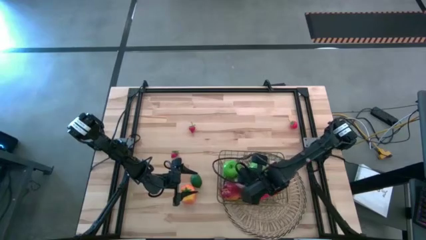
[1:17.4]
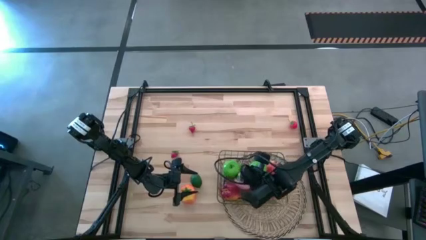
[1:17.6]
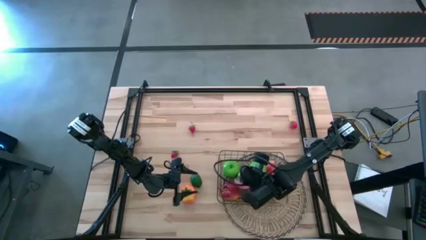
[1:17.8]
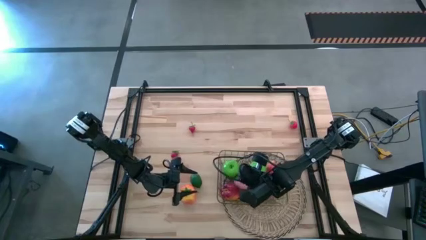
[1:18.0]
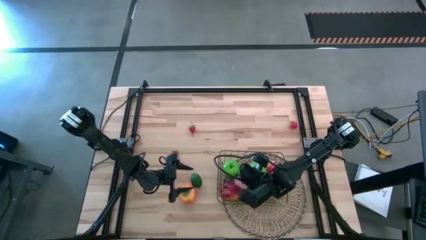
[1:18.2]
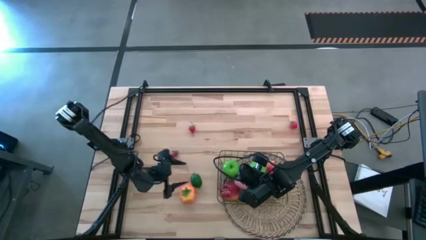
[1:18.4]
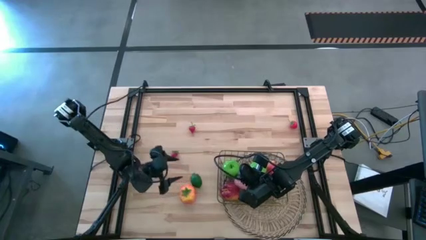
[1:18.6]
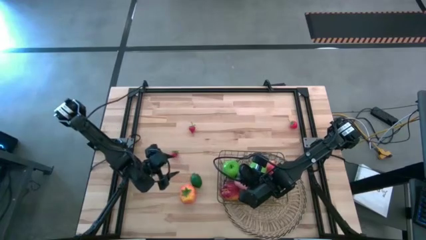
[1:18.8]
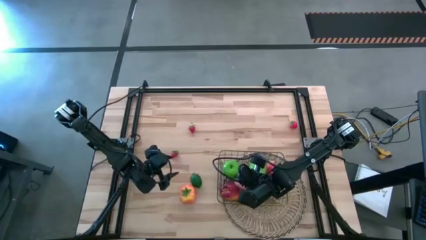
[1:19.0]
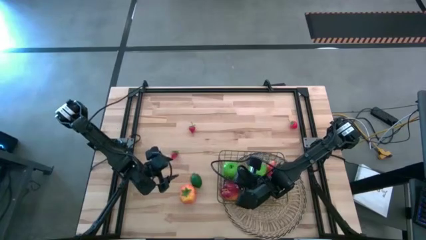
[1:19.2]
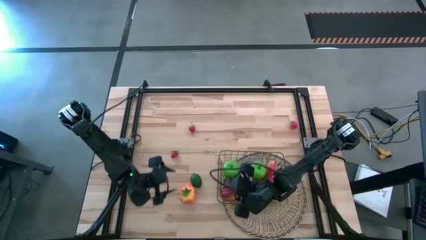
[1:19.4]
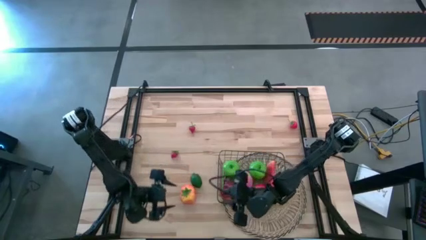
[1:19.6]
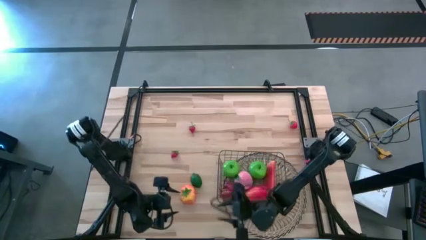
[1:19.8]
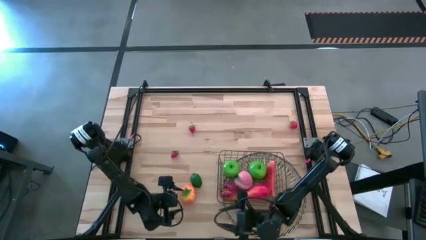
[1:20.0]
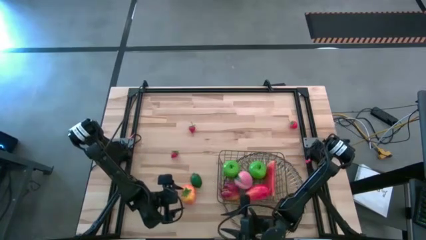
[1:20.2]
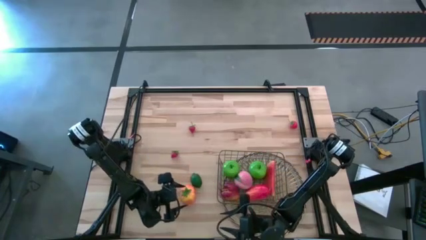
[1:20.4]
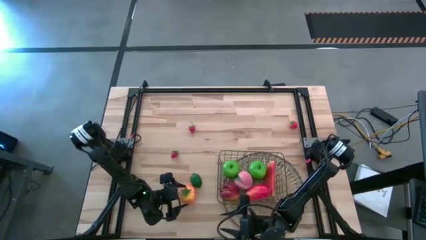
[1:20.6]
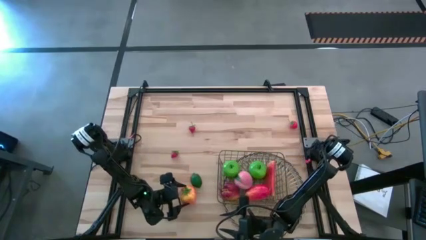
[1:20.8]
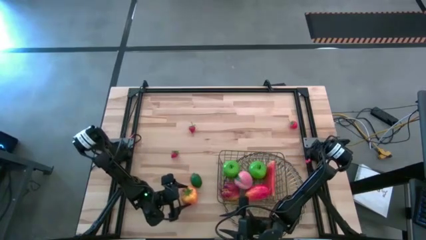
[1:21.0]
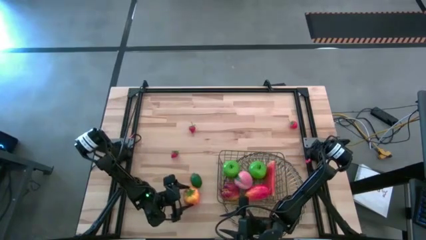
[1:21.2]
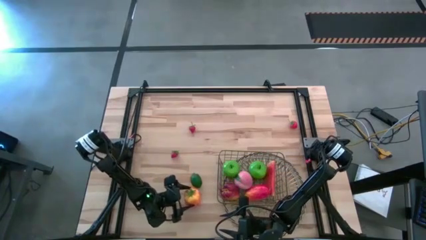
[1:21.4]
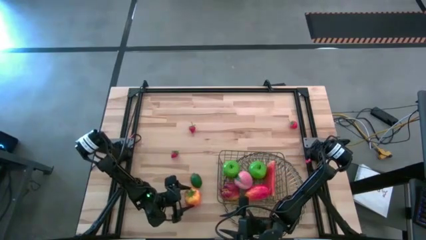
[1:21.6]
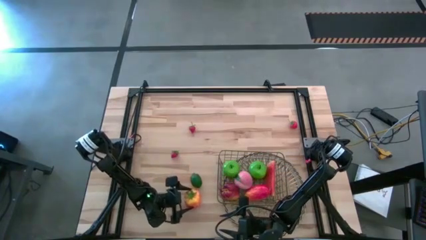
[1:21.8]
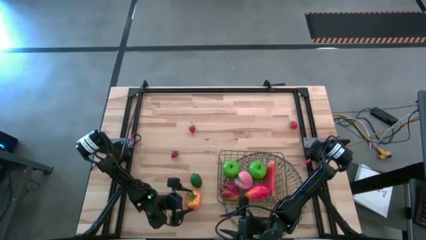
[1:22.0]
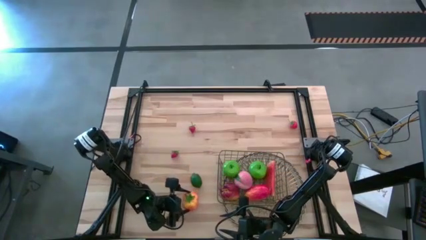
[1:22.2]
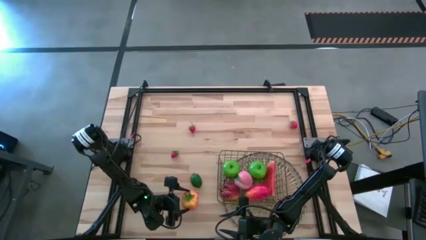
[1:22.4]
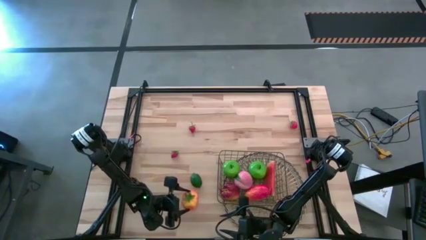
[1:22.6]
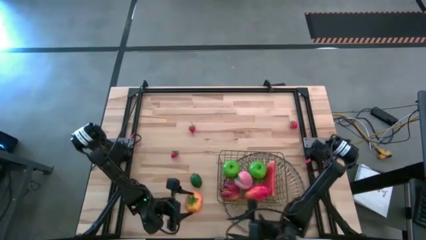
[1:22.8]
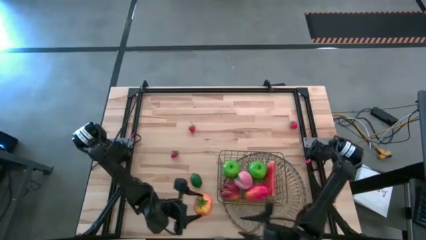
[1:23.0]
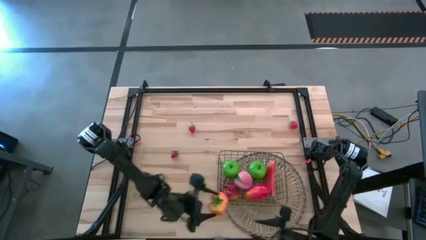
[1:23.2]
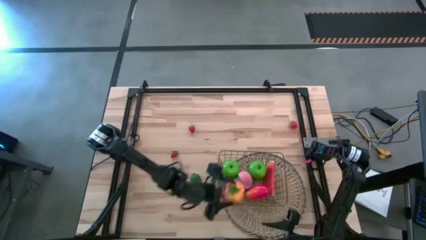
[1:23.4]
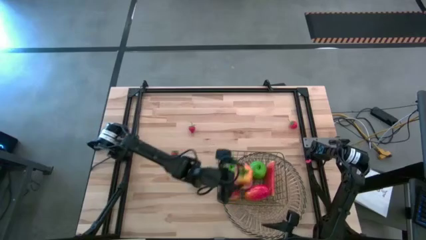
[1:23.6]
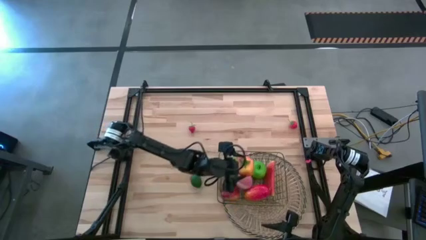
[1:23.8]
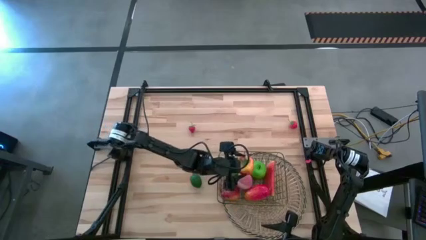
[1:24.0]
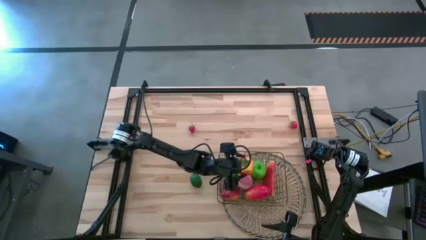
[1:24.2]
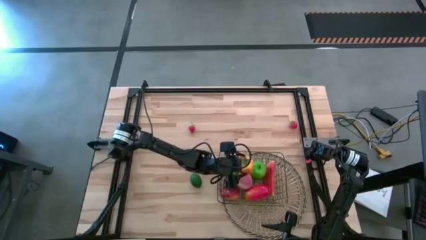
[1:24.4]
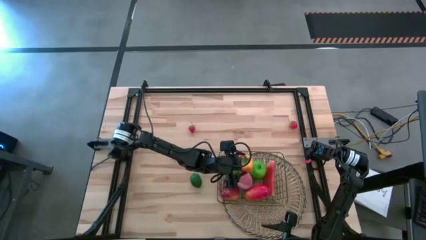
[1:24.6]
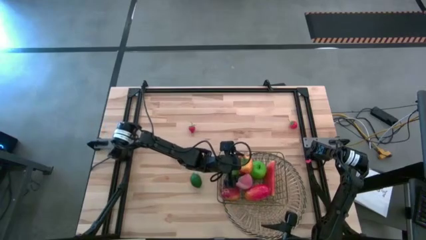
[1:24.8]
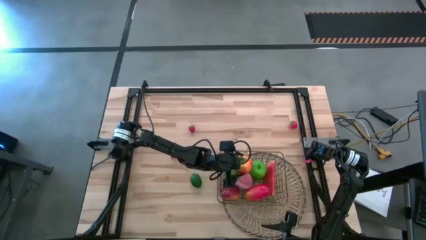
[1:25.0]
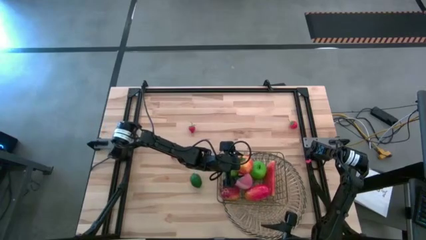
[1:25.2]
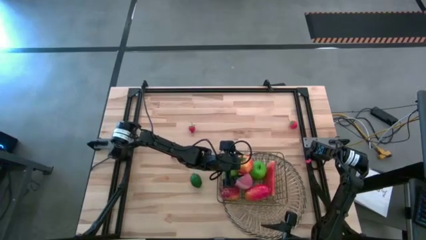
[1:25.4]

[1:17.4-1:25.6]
Task: Build produce basket
Put the tomato into the wire basket

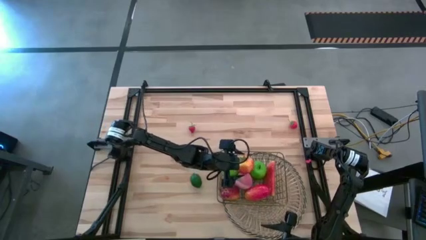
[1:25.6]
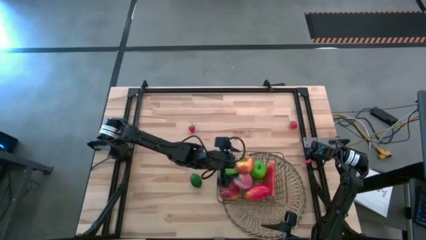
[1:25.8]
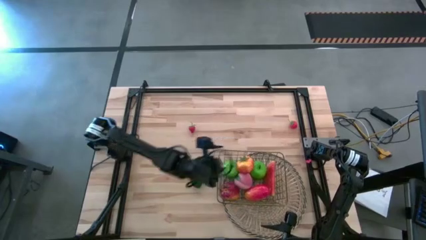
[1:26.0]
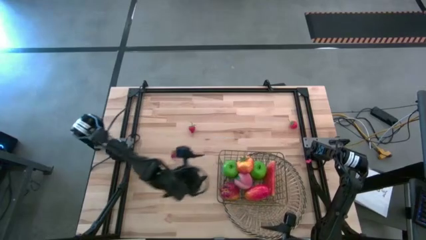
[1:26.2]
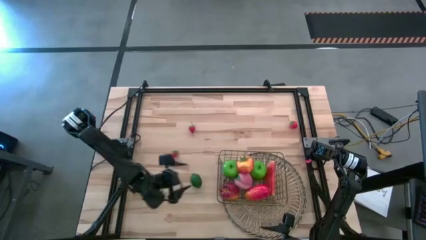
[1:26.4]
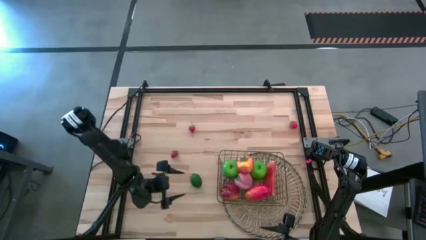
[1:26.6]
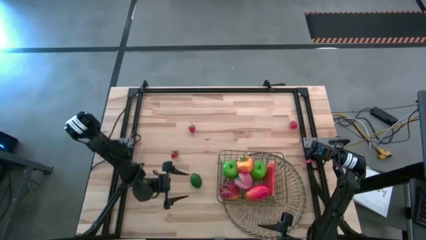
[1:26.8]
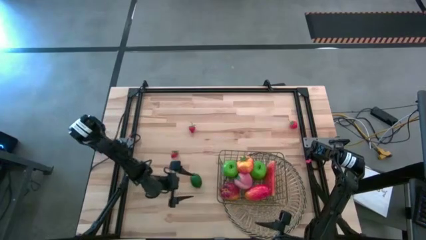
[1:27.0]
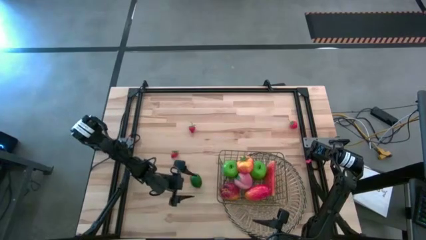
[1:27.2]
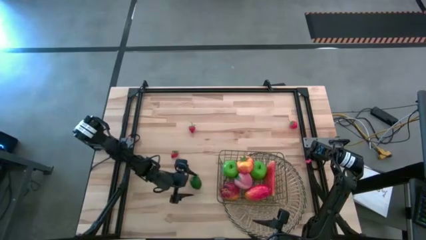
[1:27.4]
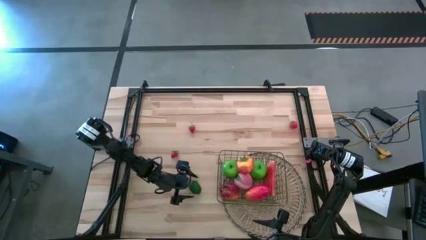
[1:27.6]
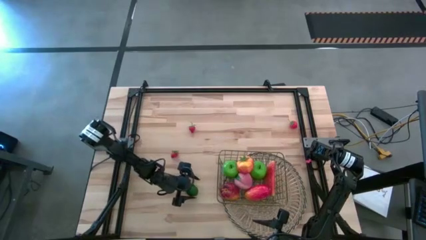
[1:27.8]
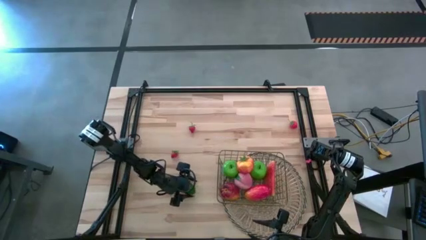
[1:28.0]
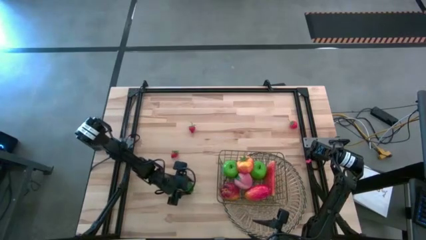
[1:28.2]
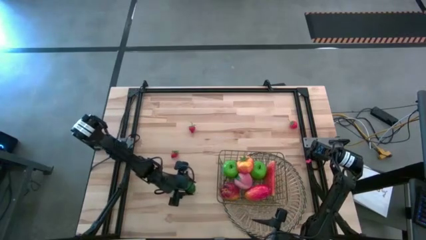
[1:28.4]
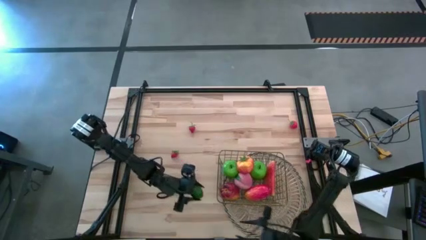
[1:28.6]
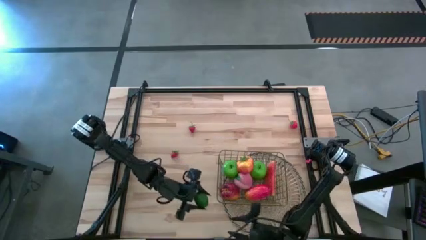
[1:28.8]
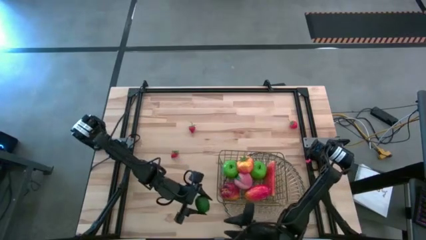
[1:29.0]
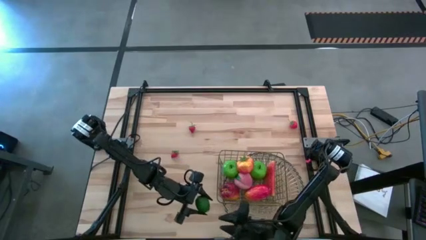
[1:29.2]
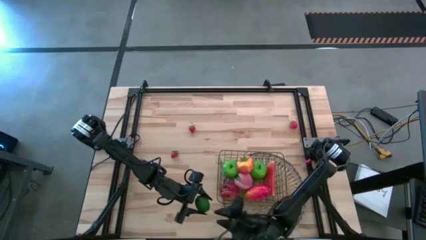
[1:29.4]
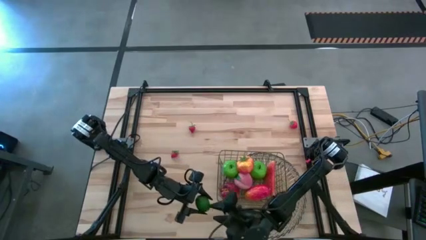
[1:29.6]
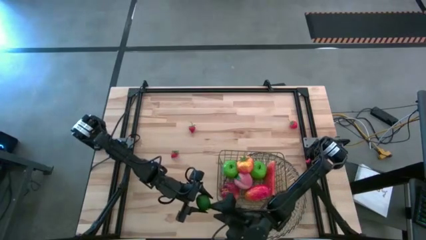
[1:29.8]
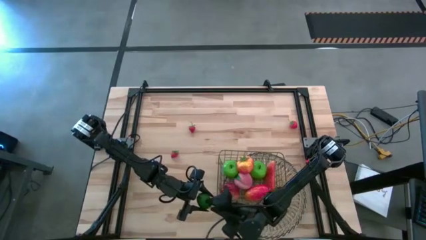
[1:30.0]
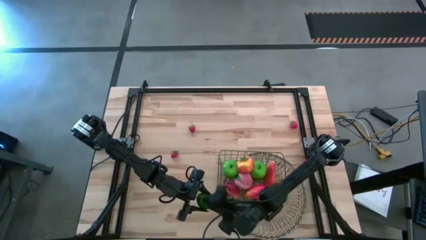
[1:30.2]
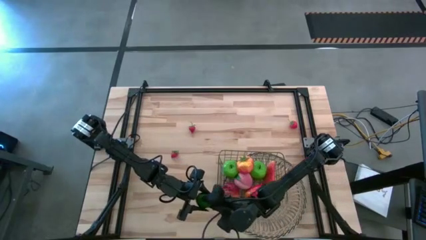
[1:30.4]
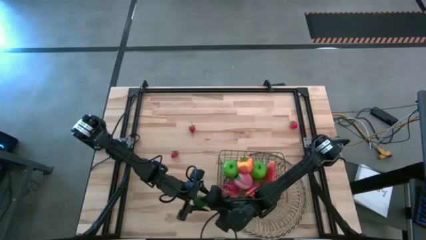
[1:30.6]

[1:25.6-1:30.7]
Put the lime into the wire basket
